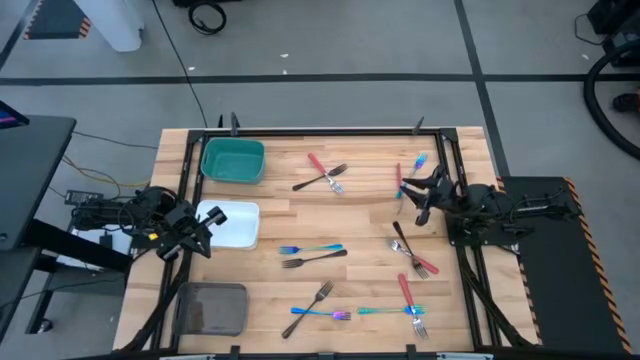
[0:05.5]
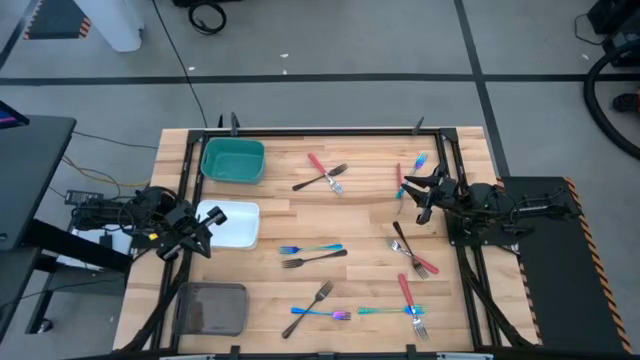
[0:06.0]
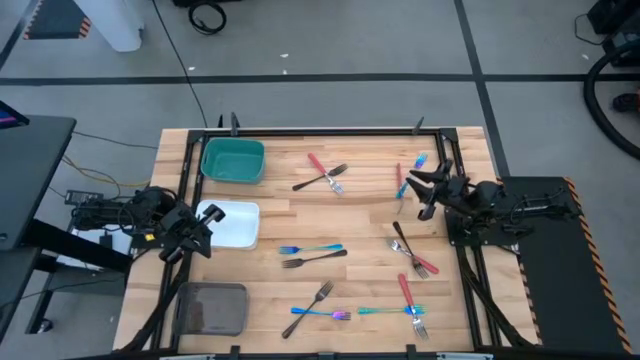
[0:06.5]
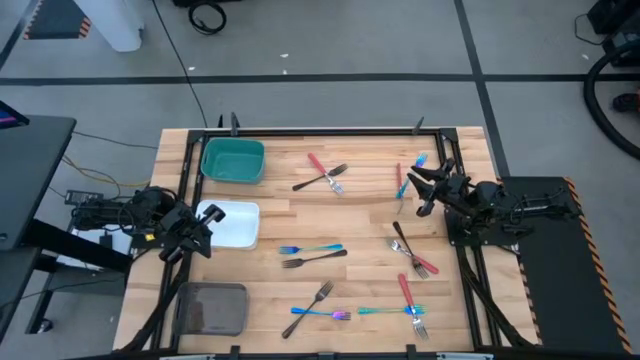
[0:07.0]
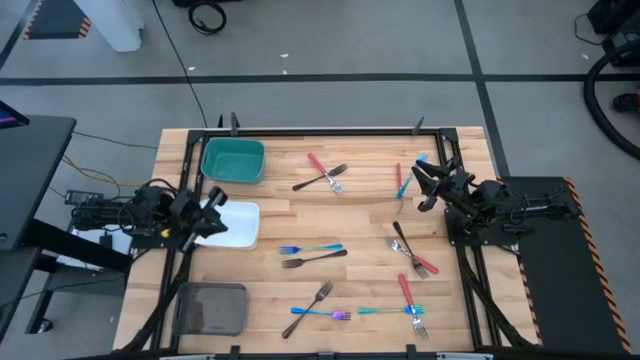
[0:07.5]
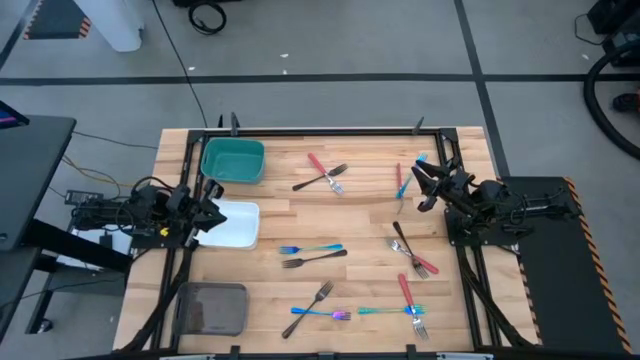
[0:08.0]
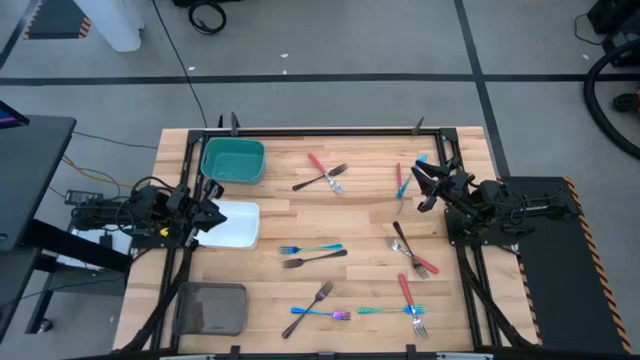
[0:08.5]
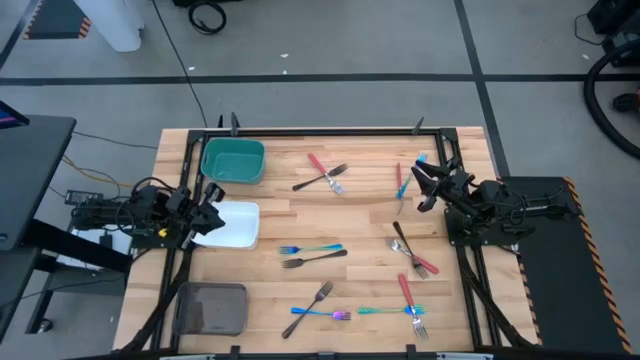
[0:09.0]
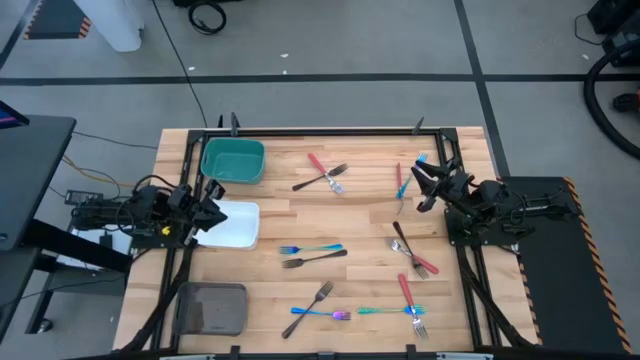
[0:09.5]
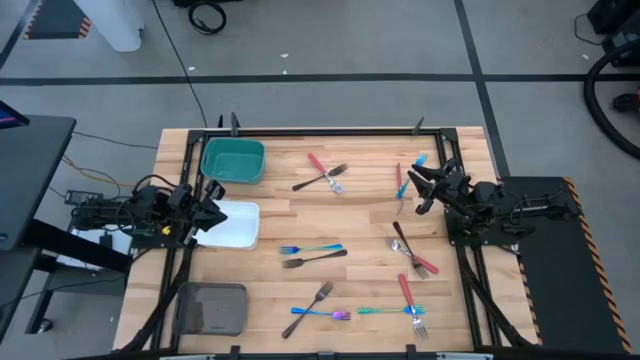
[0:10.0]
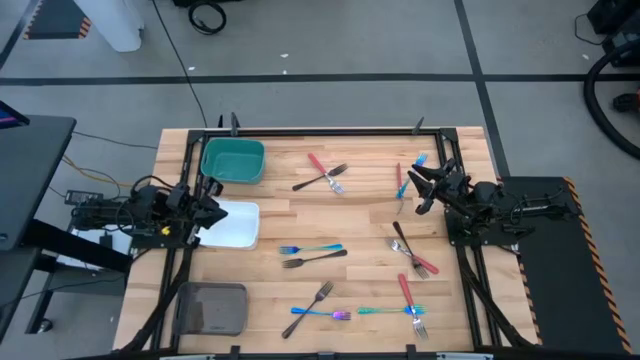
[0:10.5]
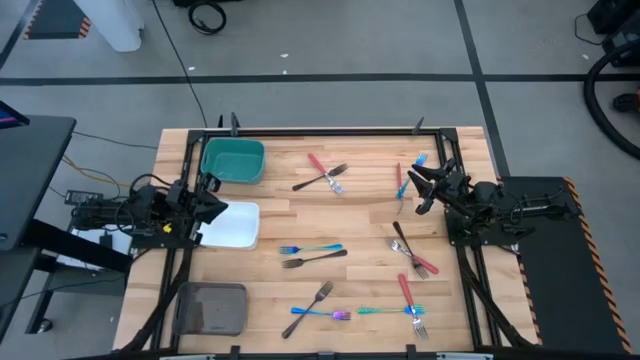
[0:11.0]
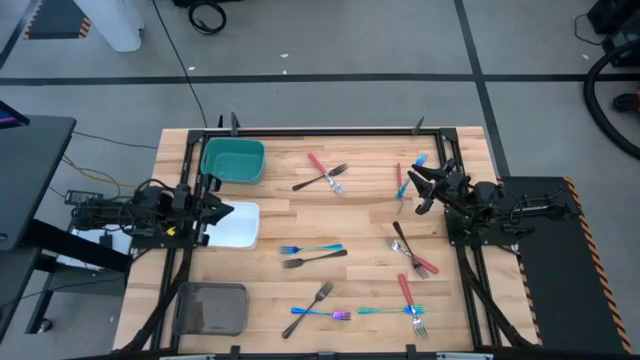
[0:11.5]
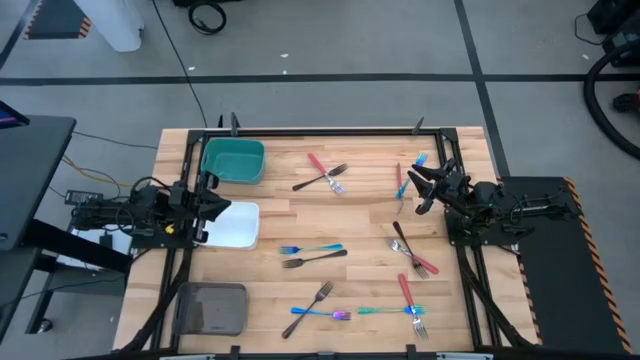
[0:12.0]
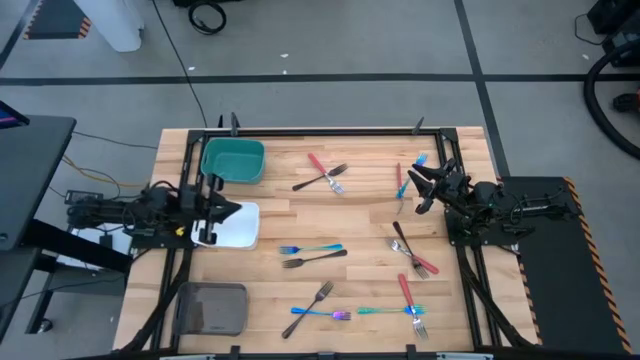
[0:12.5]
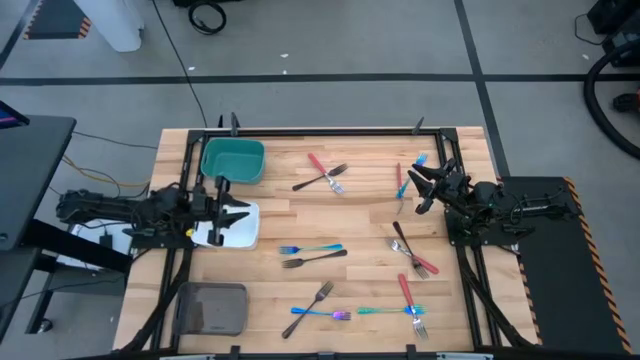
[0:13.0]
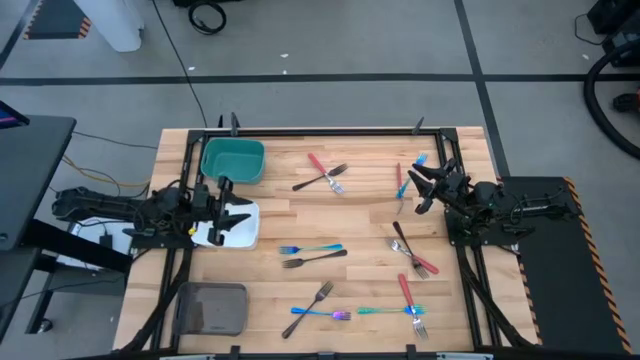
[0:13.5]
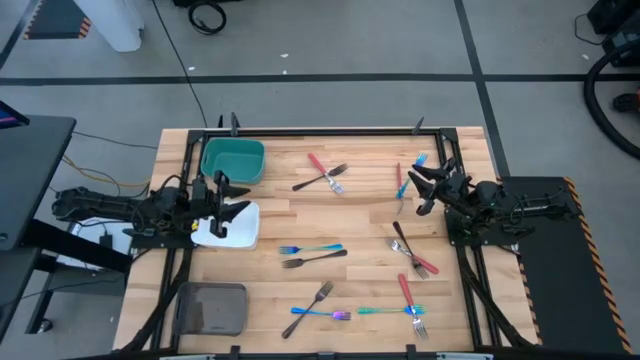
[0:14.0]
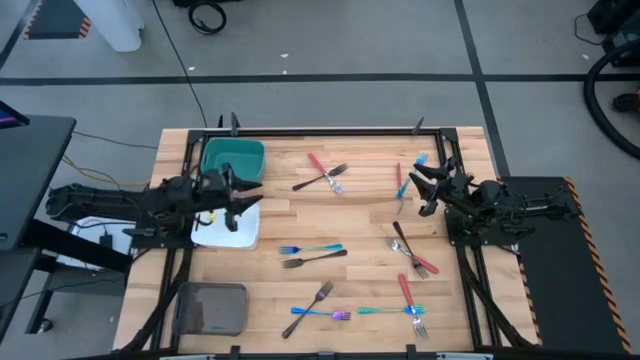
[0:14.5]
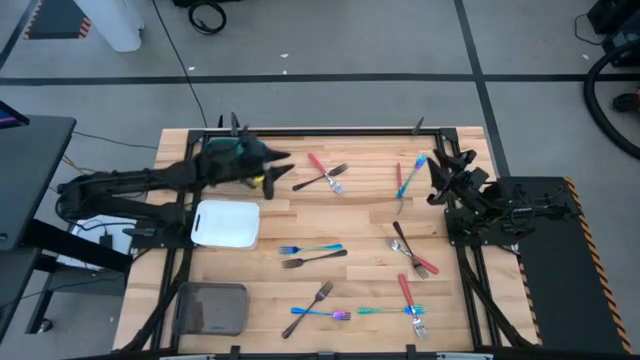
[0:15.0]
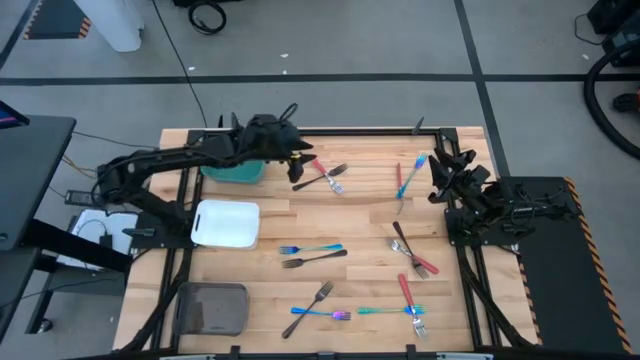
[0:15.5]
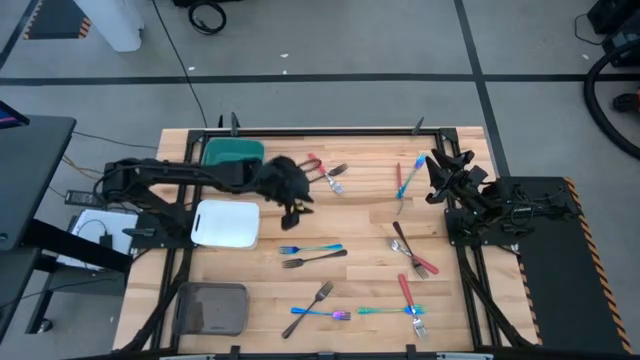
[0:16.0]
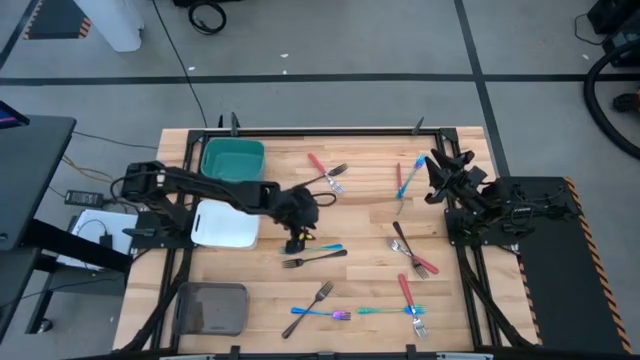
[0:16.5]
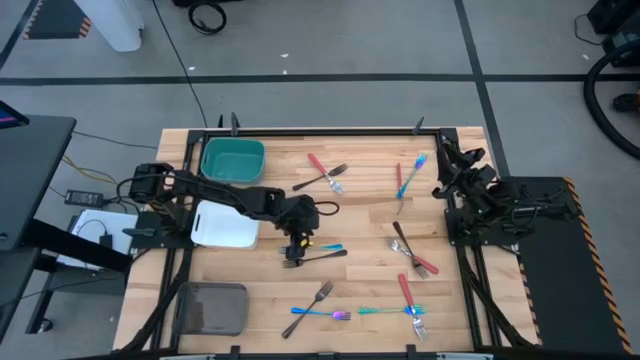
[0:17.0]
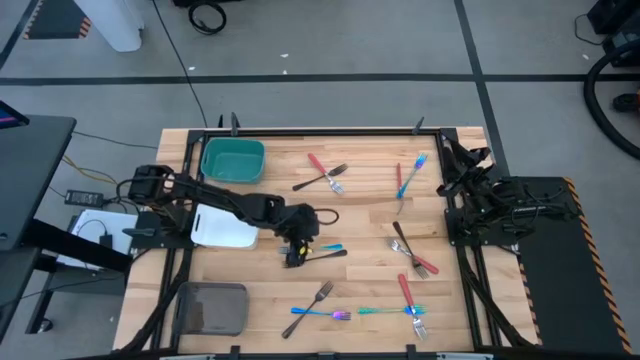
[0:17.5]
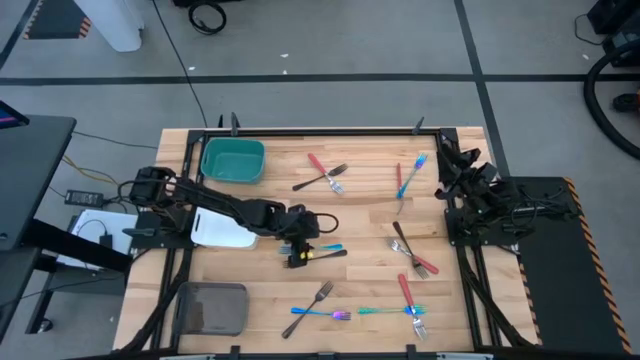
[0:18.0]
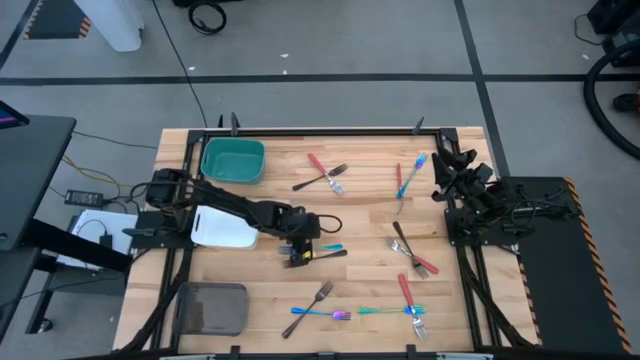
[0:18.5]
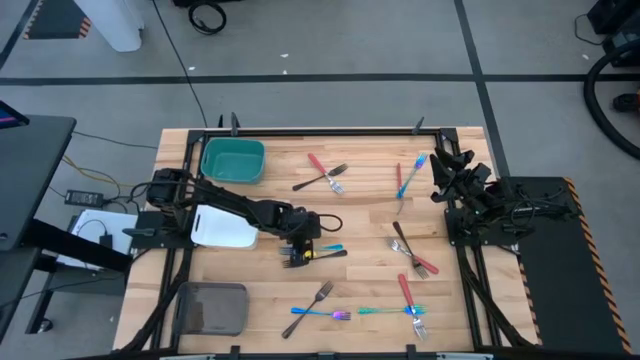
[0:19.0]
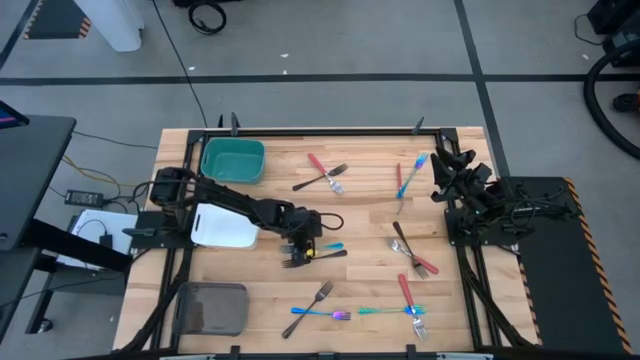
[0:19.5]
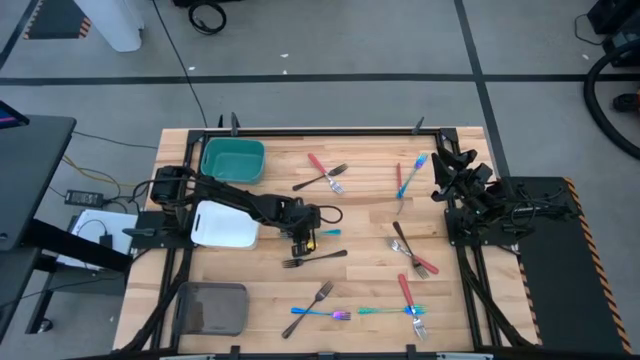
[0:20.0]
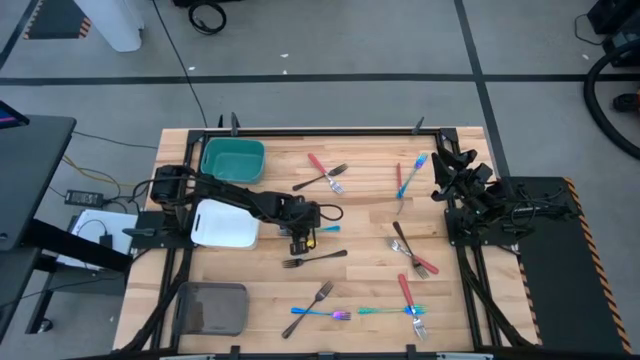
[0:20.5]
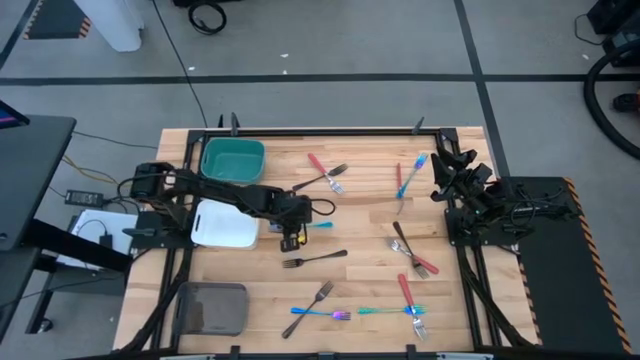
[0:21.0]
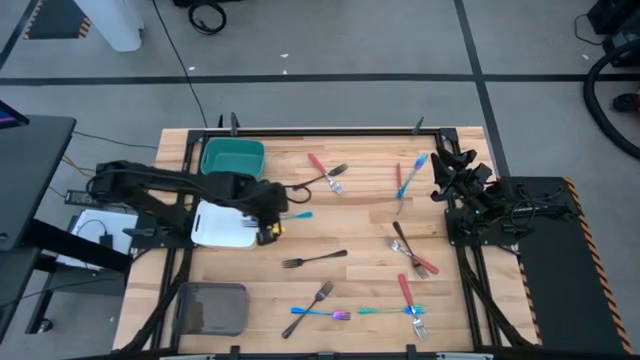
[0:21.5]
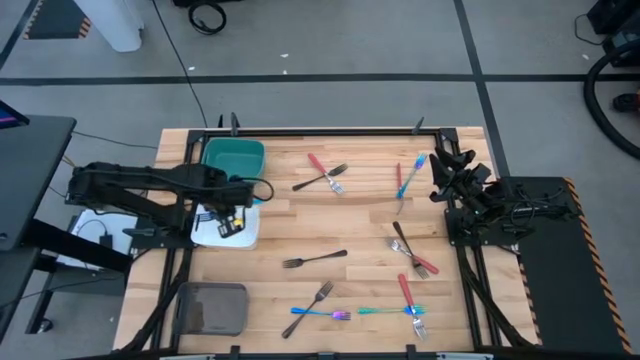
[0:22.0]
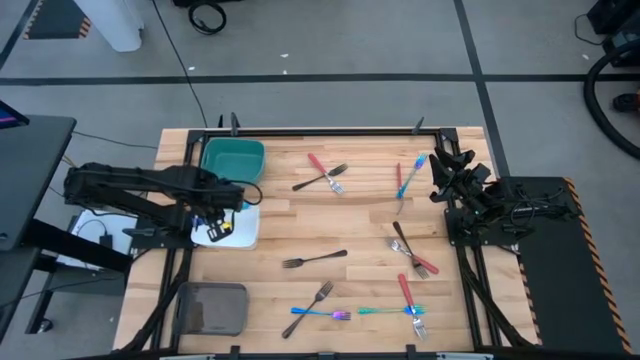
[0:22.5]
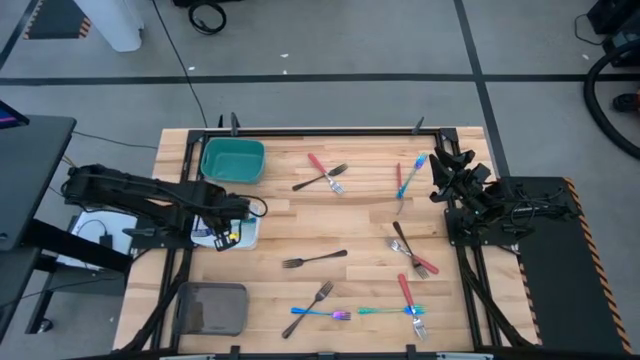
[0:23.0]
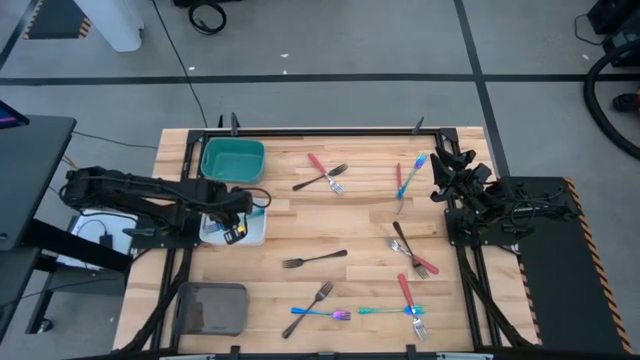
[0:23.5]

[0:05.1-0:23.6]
Task: Sort silverware by color (type)
Put the blue fork into the white bin
